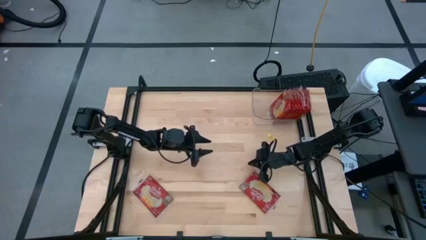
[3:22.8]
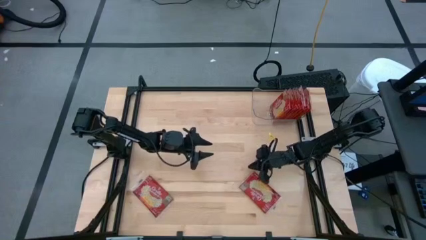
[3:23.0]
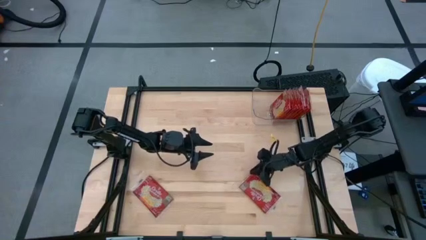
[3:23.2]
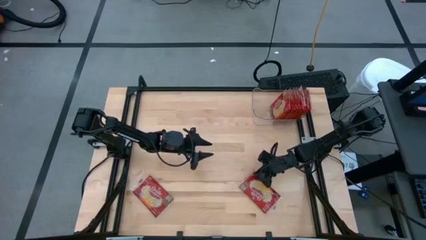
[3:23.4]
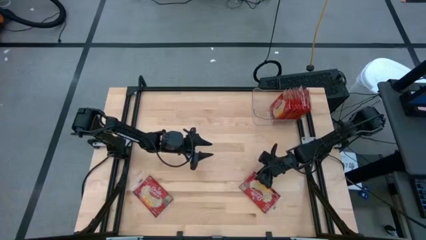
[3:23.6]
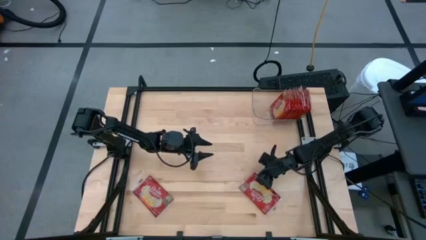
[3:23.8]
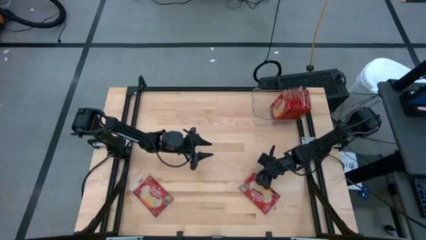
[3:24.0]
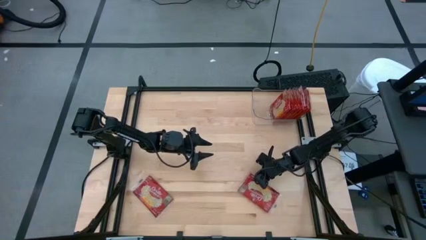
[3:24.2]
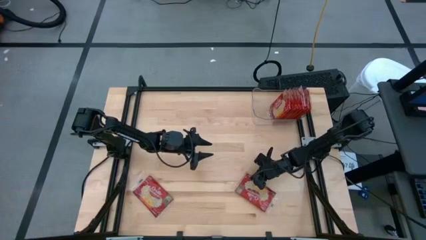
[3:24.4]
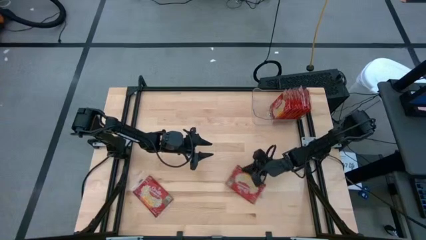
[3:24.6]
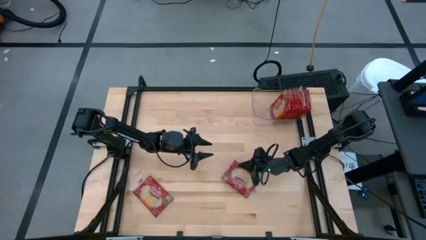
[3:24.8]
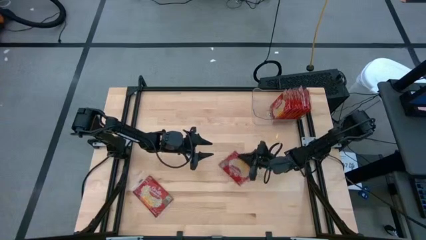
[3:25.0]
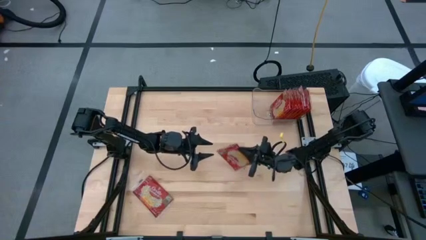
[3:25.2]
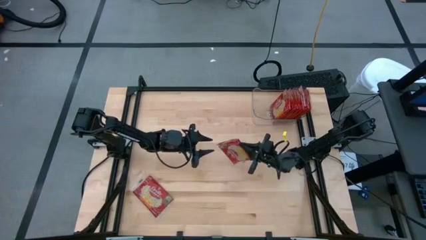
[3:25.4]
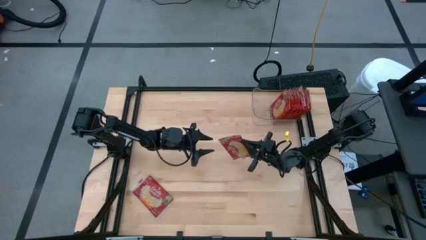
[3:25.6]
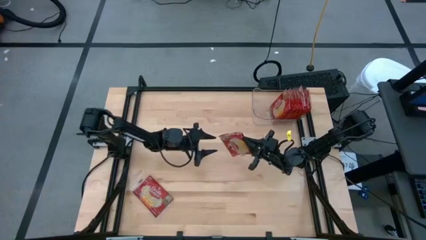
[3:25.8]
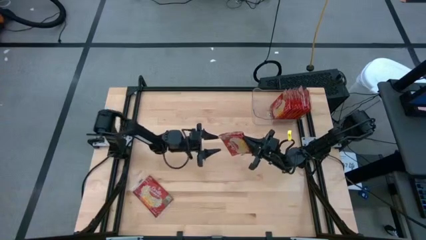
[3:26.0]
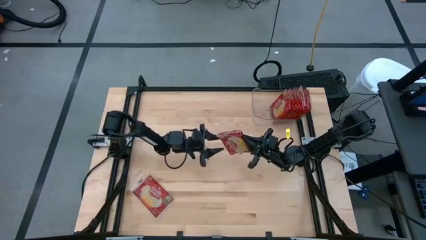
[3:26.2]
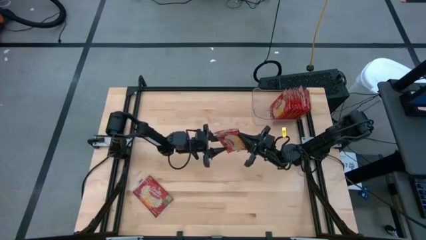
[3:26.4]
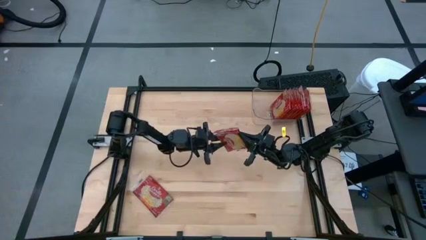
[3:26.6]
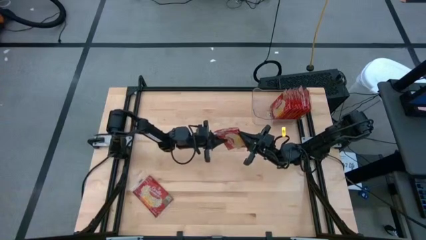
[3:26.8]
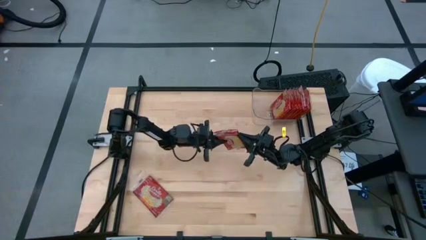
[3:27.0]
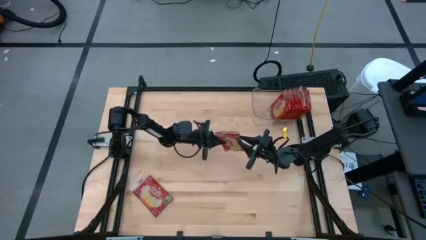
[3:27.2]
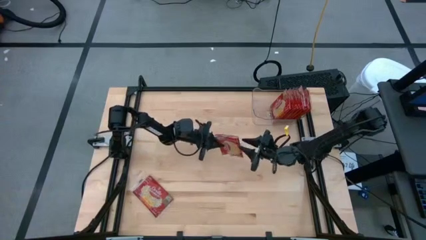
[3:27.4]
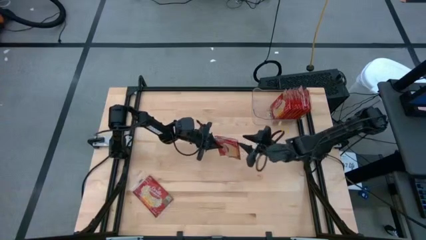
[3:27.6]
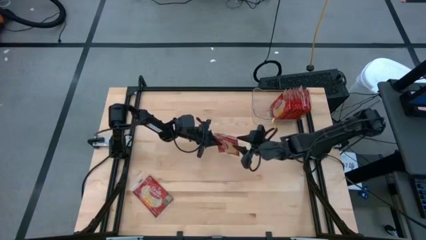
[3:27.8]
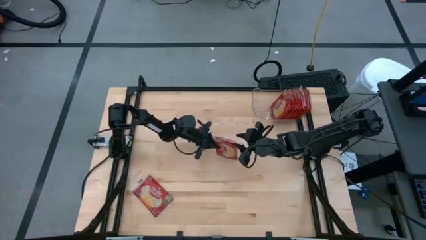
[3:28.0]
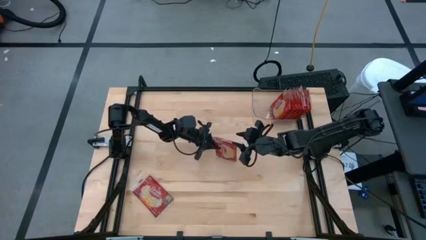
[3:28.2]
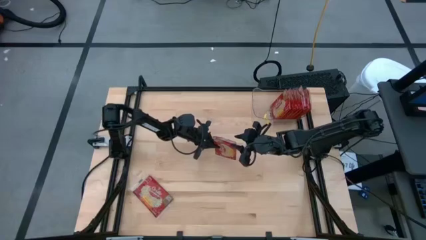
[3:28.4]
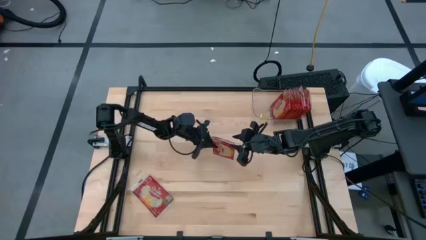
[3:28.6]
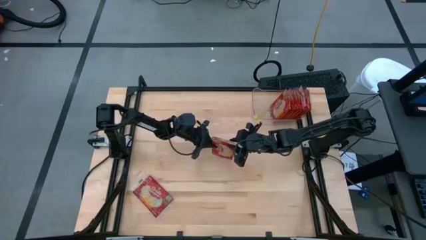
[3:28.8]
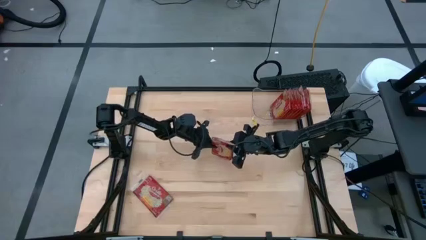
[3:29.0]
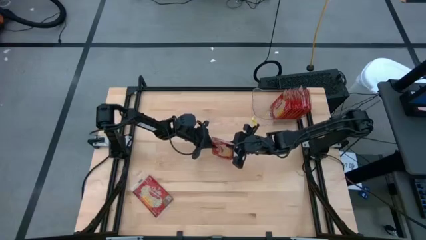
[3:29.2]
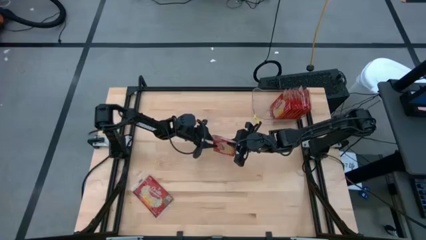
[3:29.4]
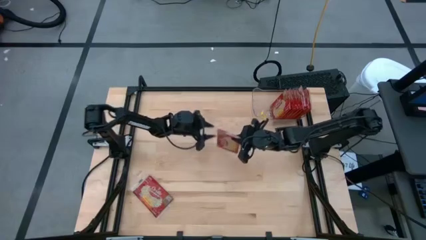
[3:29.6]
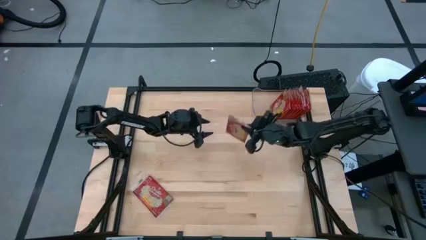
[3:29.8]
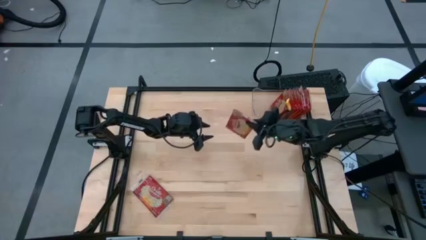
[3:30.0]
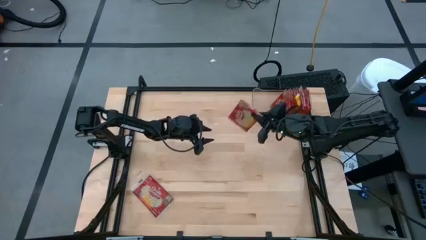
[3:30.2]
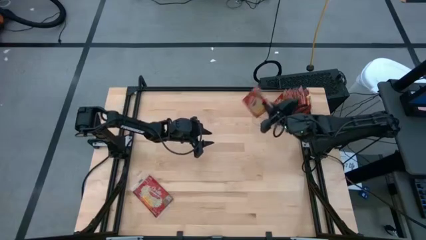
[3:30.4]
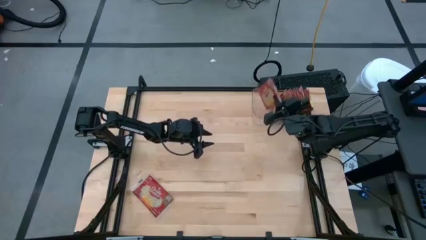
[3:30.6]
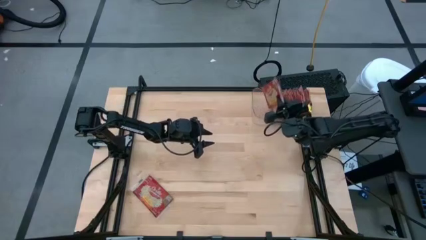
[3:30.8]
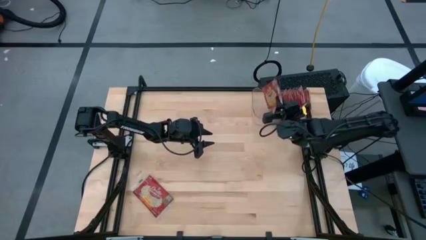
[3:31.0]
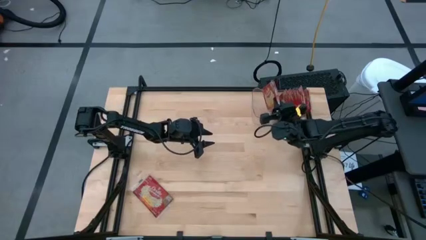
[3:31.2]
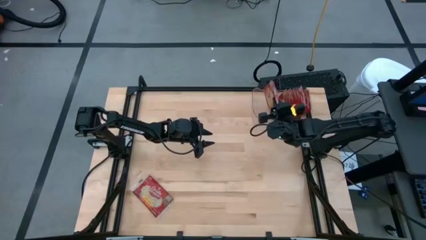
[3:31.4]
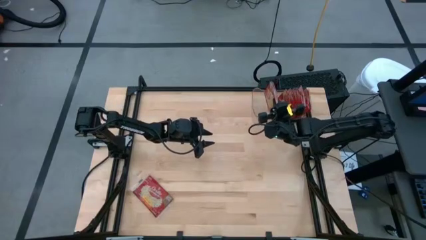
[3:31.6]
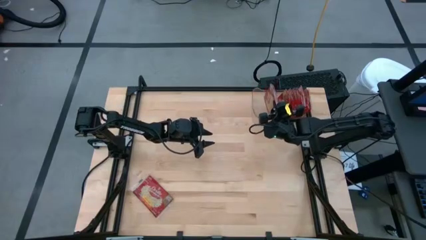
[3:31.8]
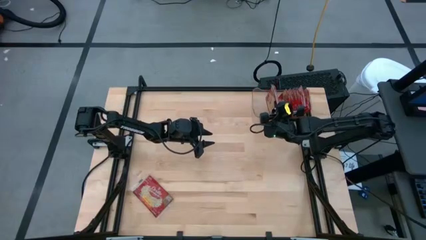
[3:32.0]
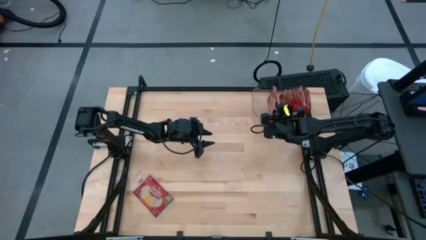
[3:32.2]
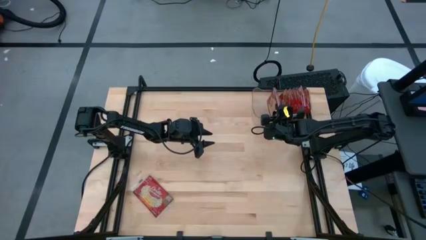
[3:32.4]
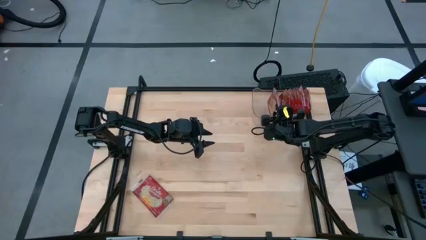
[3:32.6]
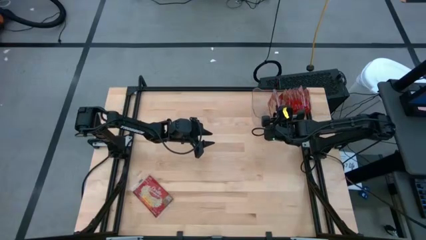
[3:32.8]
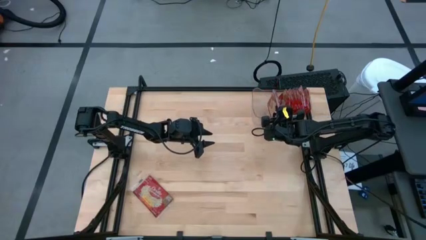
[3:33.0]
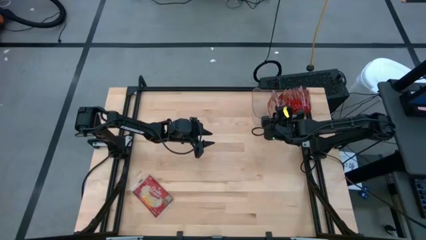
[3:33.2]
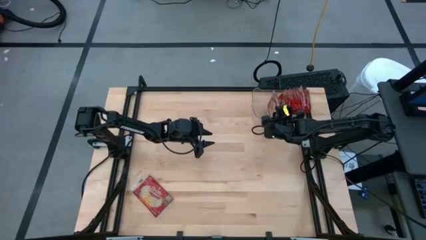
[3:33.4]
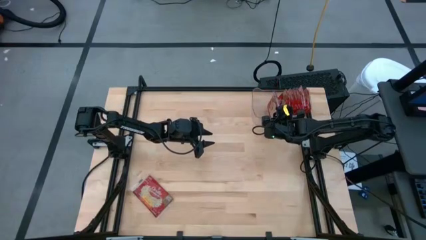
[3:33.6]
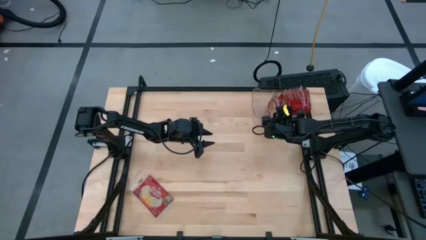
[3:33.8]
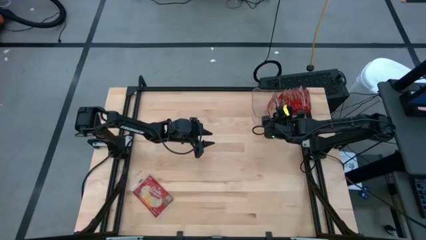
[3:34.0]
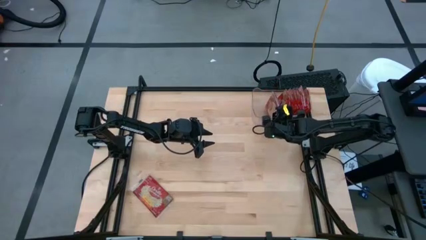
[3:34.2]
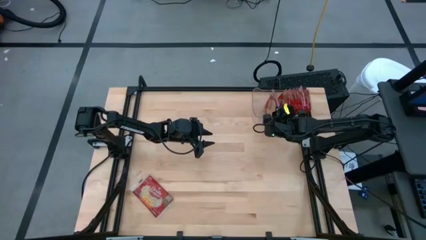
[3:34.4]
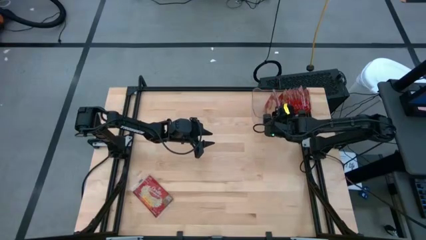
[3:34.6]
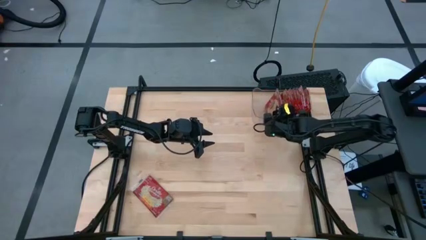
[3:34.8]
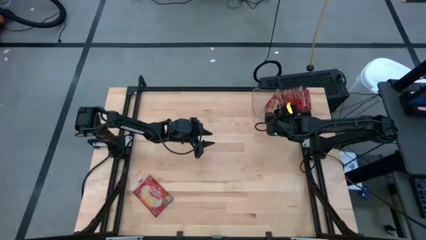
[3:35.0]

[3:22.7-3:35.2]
Task: Sort popcorn bags into baskets
Put the red popcorn bag into the transparent bin

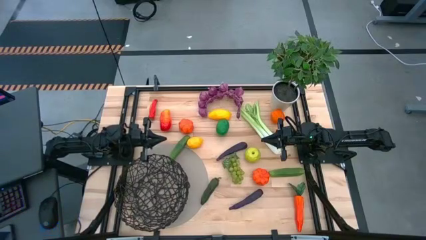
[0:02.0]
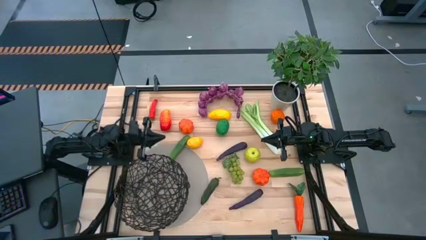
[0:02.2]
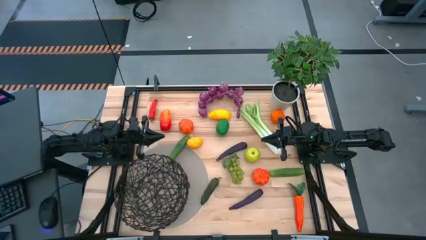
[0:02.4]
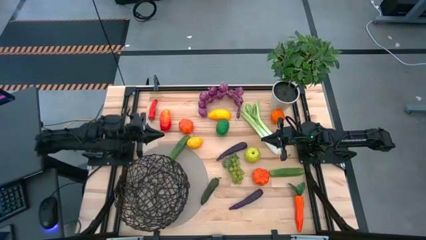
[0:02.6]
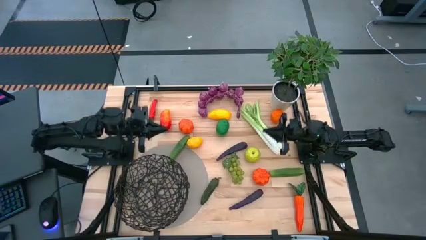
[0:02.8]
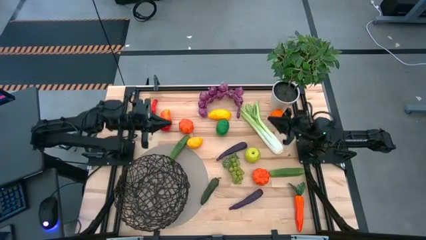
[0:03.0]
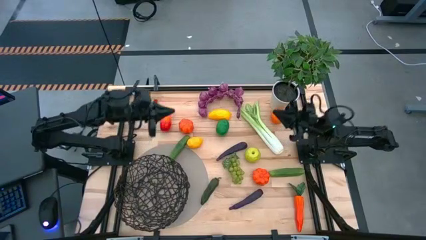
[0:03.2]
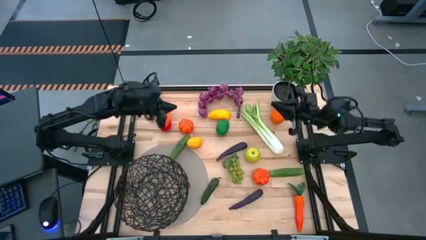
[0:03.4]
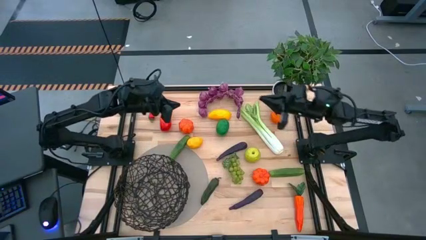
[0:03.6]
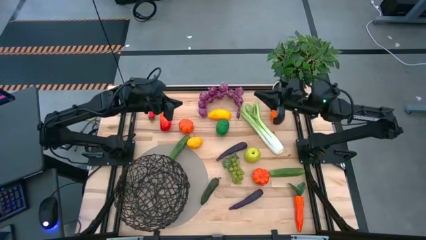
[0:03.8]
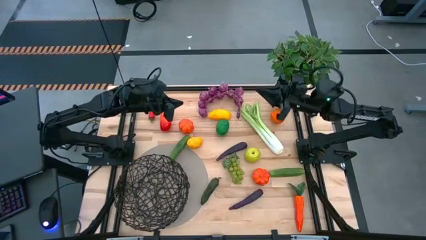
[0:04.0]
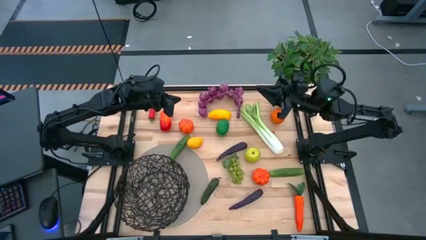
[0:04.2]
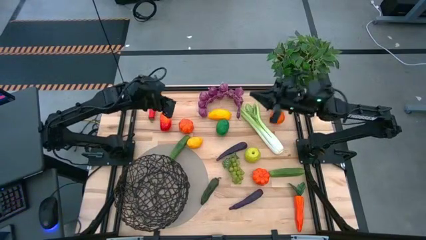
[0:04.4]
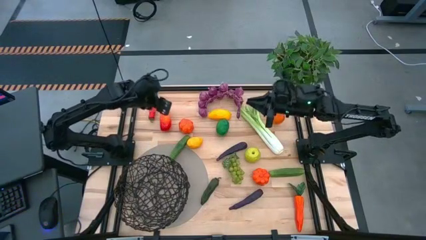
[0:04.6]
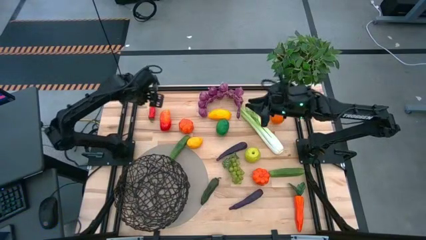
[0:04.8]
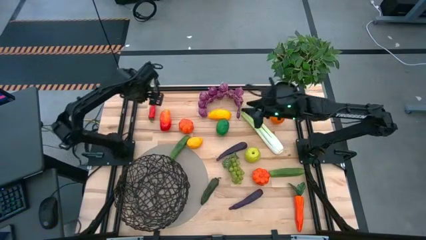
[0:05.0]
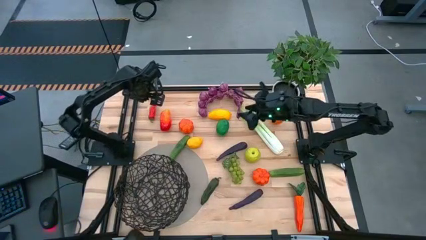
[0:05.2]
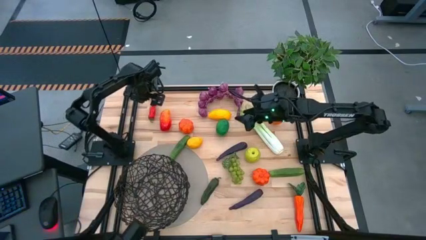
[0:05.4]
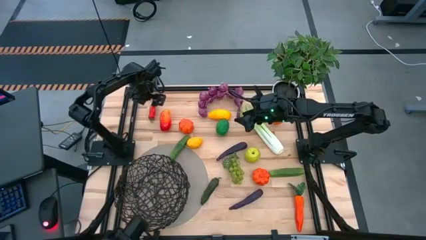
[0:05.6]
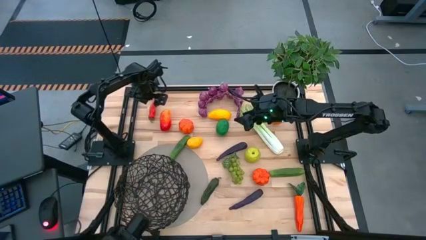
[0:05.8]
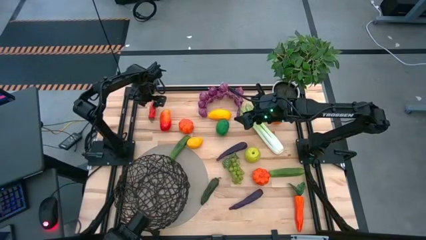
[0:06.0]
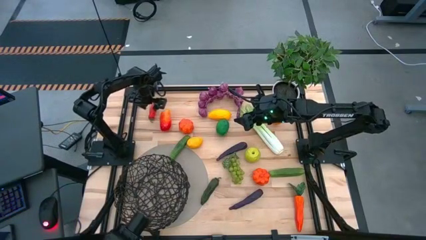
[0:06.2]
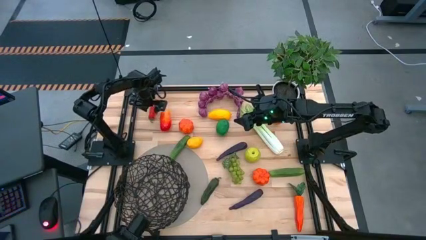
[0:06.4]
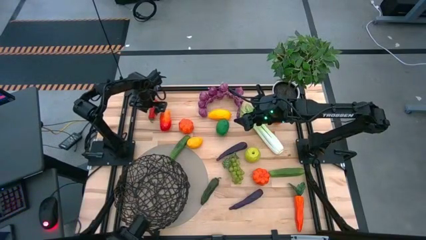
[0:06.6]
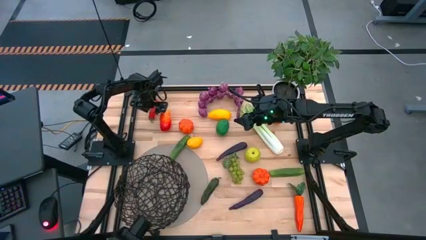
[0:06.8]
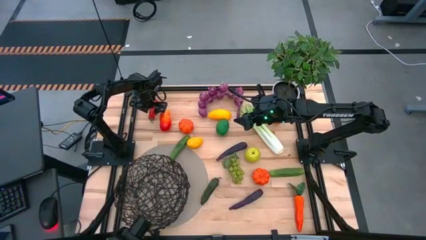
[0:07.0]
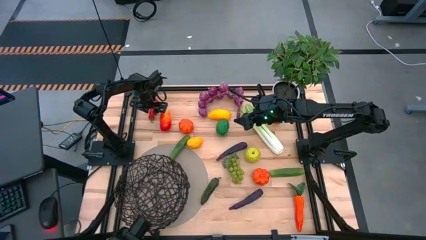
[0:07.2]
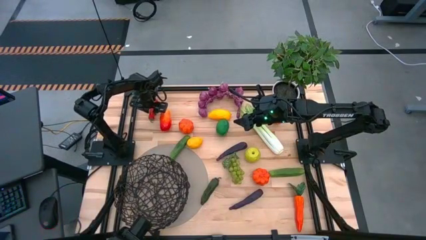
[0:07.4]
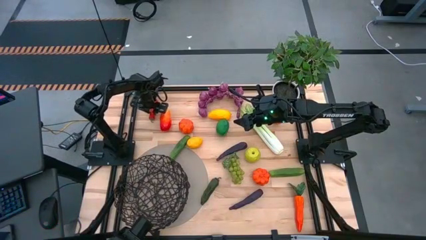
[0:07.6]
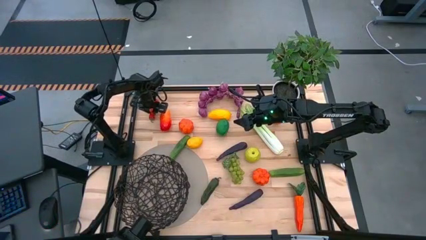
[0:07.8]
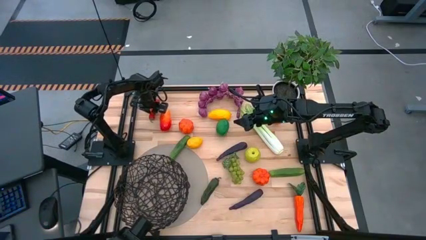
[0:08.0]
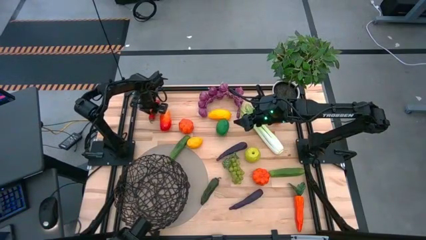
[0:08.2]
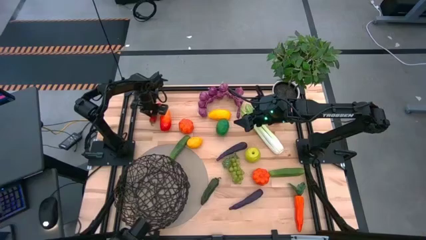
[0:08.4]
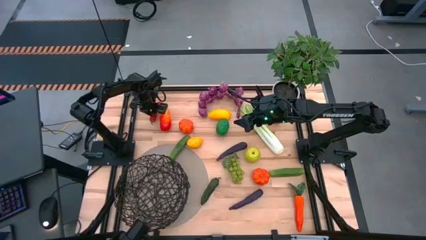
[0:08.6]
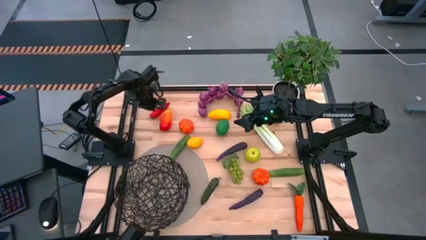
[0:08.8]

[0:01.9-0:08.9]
Task: Build produce basket
Put the red chili pepper into the black basket
